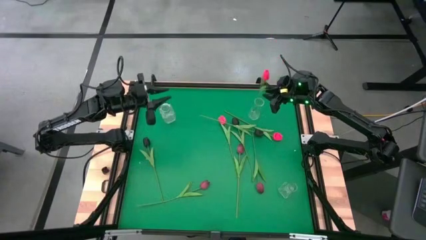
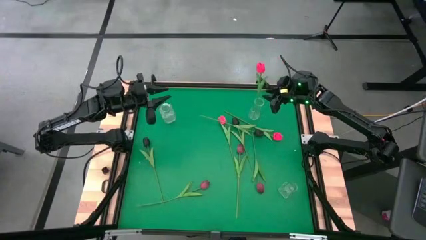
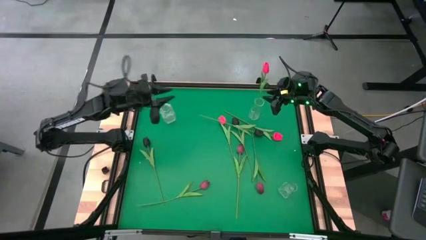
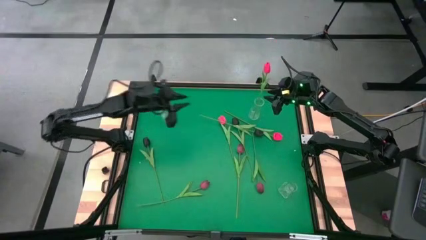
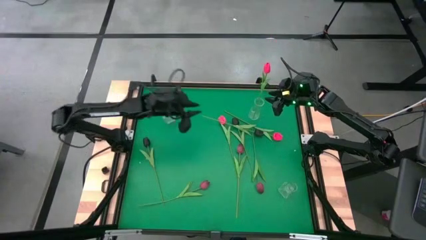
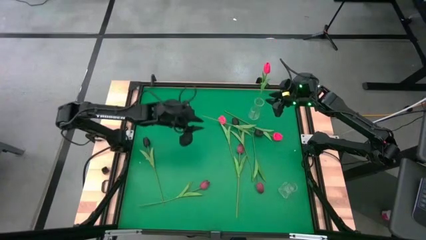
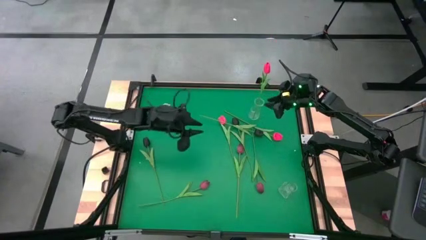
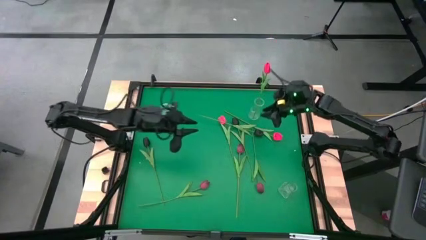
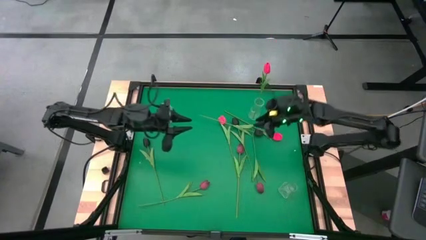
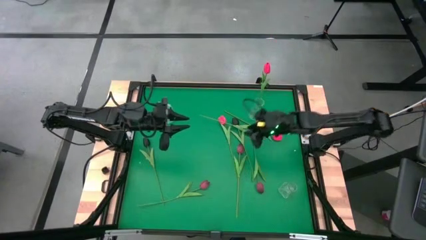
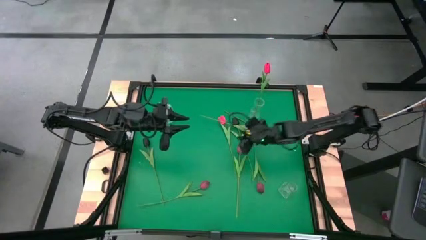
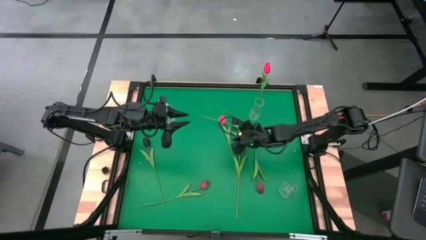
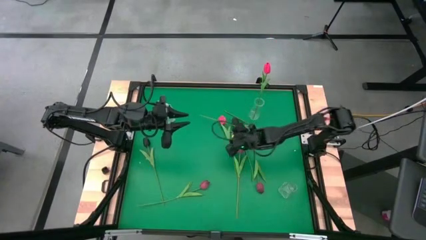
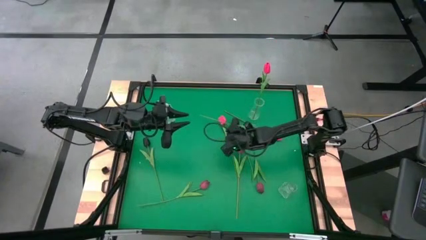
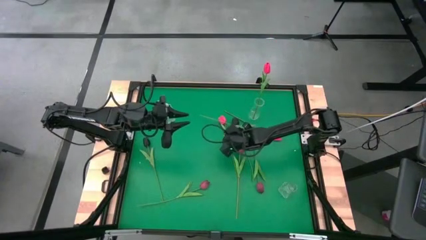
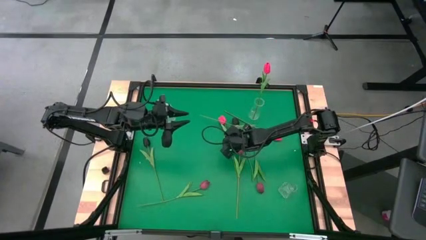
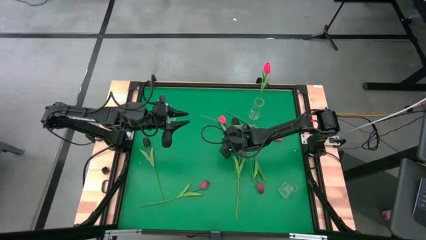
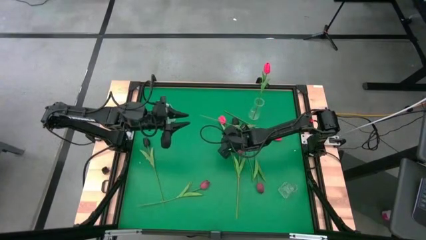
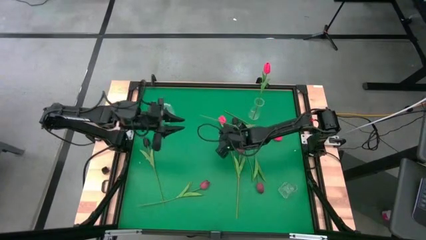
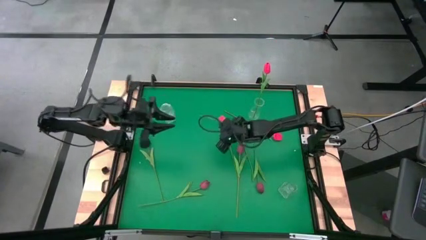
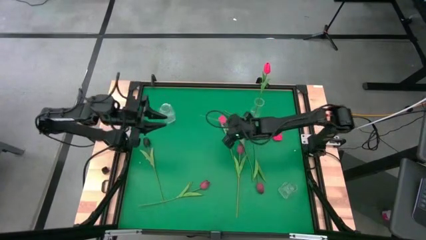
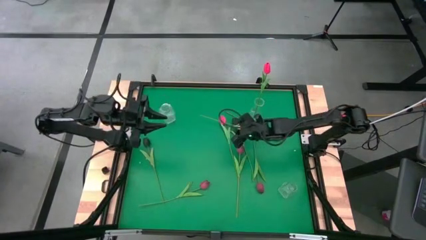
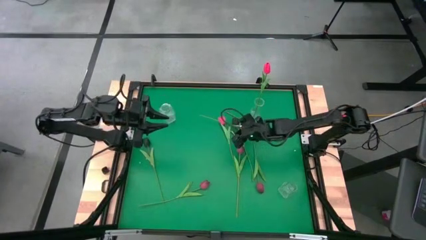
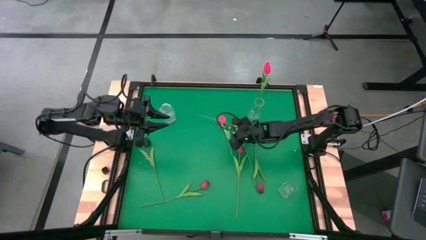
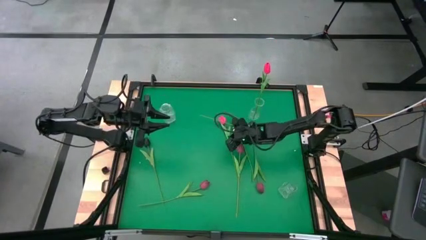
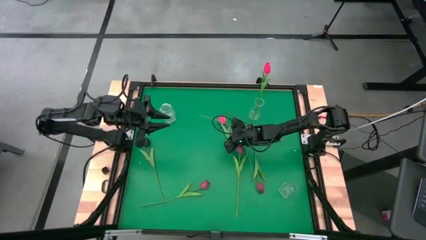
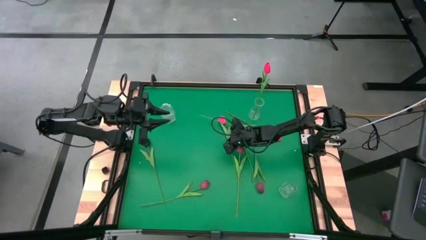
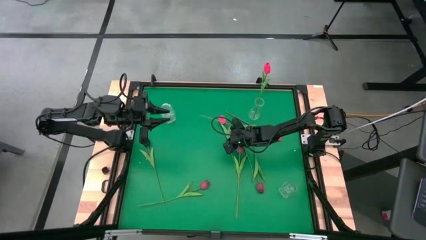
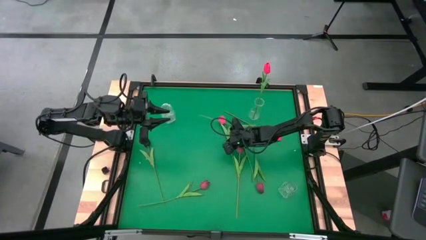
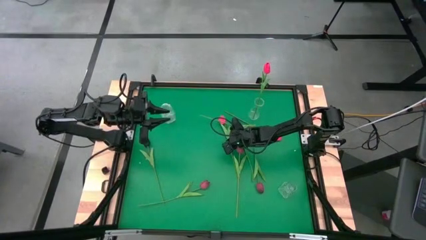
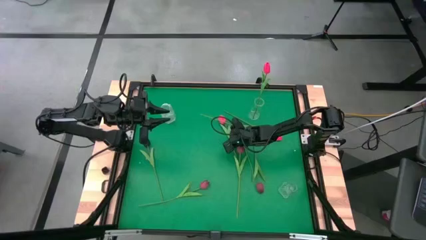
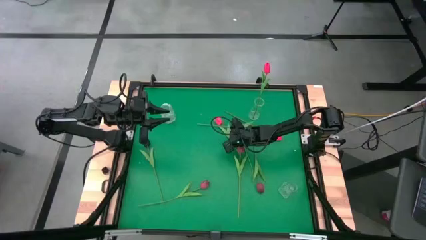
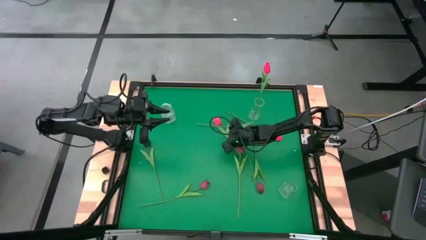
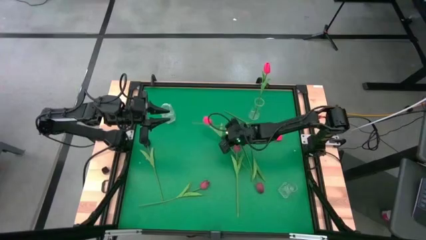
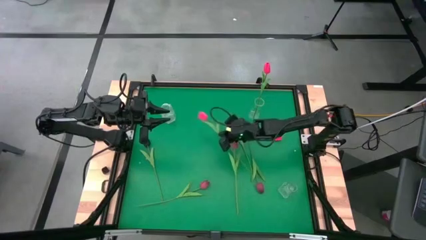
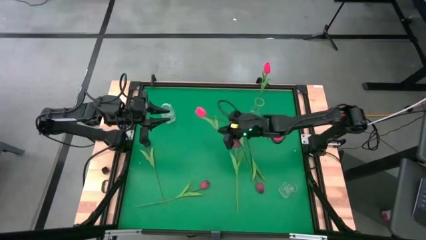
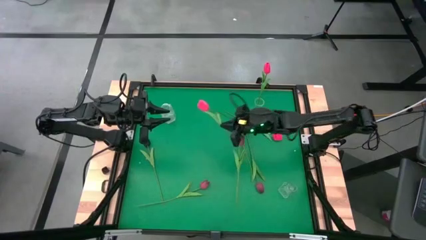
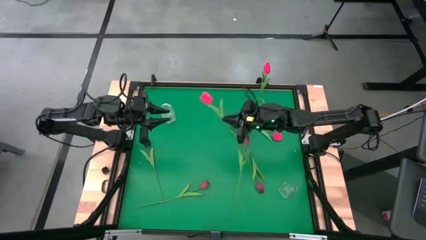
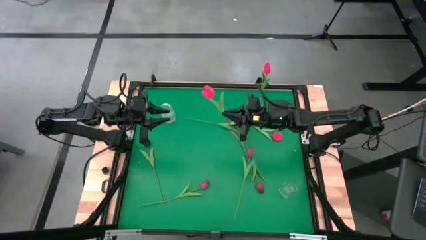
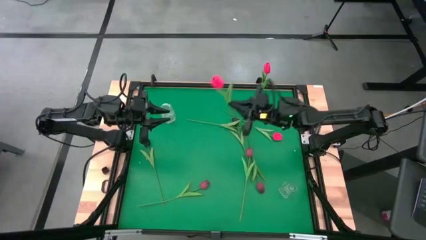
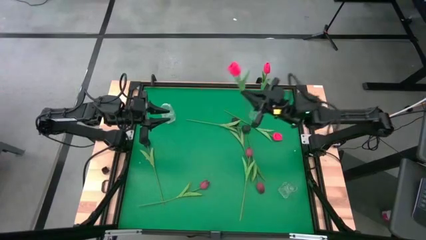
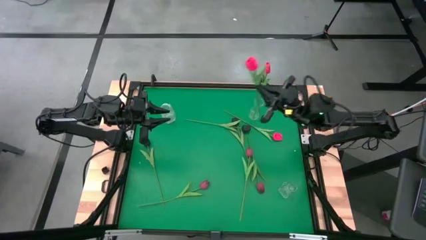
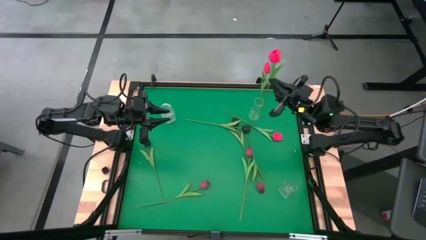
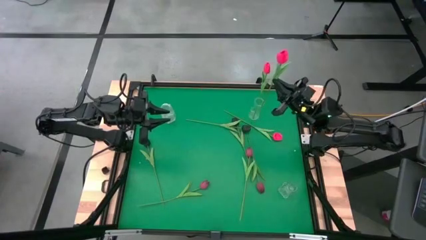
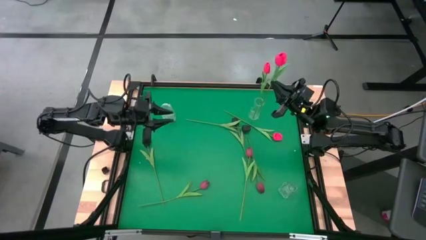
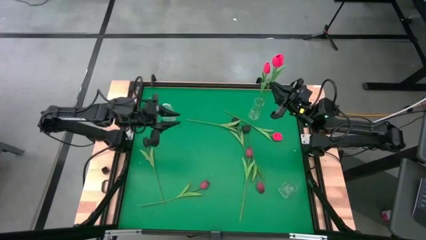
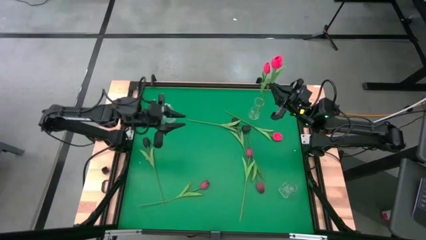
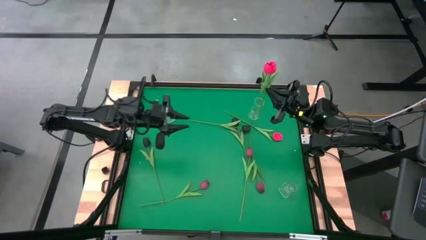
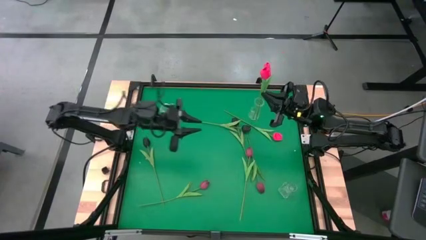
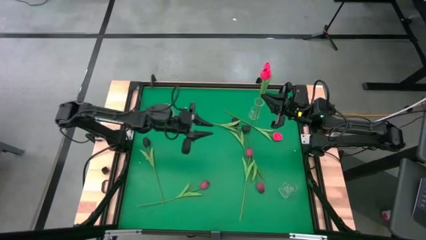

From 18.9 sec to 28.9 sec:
Task: Sort flowers into vase by color
Put the left pink flower into the top right transparent vase
